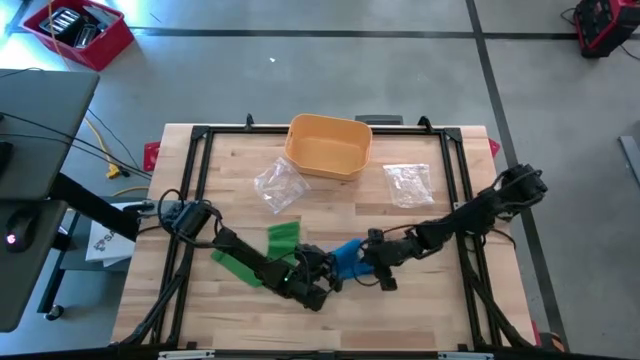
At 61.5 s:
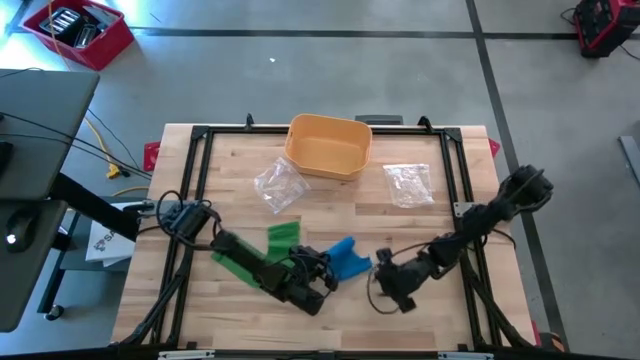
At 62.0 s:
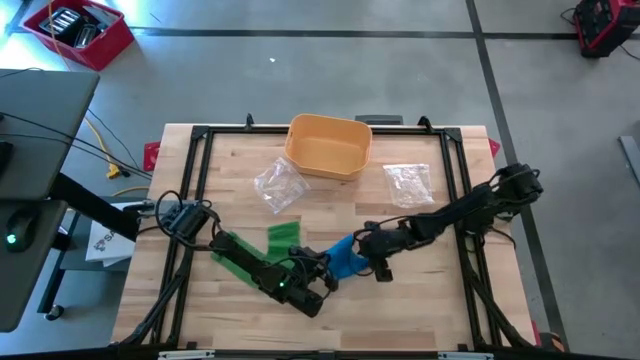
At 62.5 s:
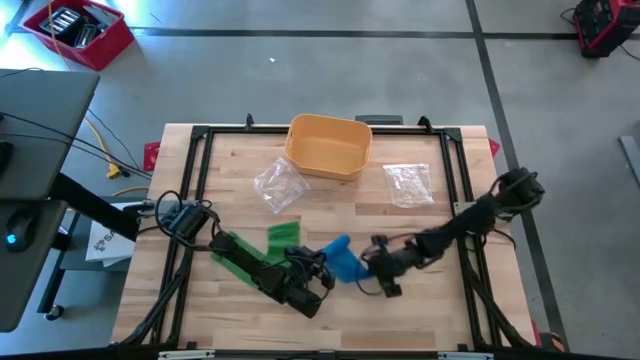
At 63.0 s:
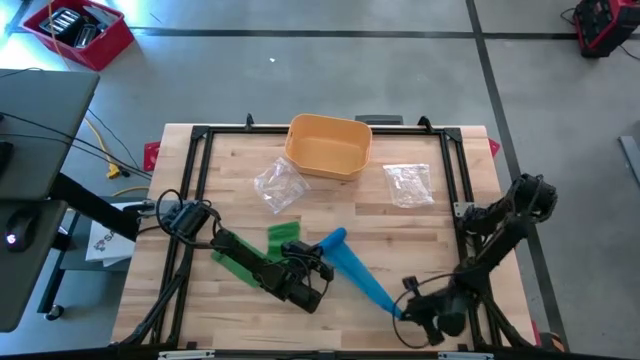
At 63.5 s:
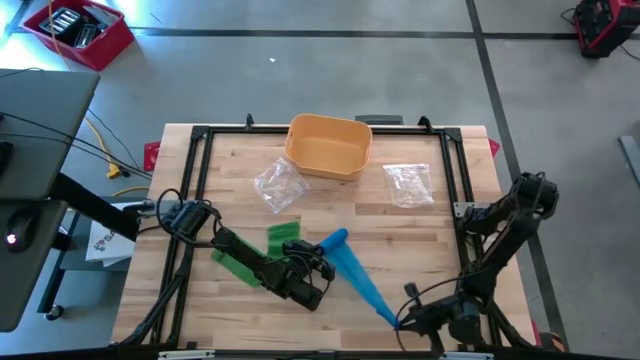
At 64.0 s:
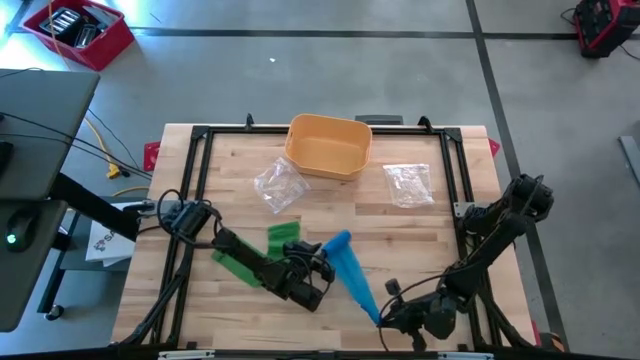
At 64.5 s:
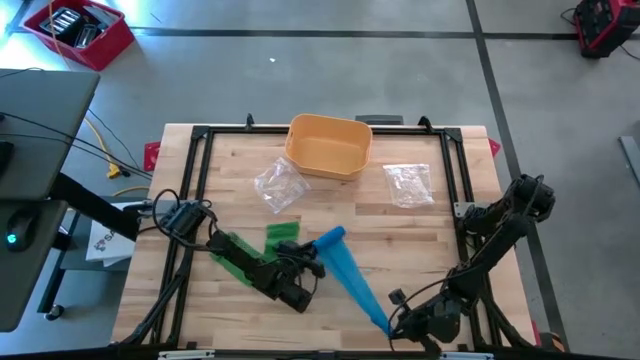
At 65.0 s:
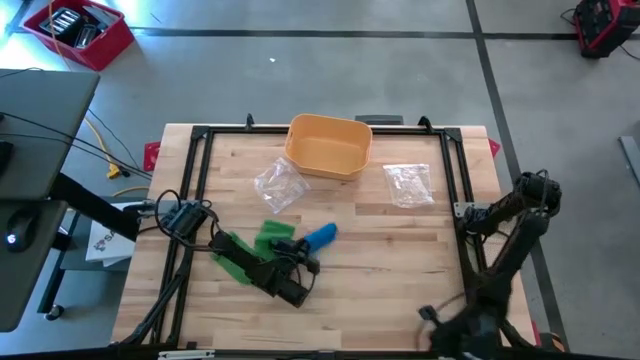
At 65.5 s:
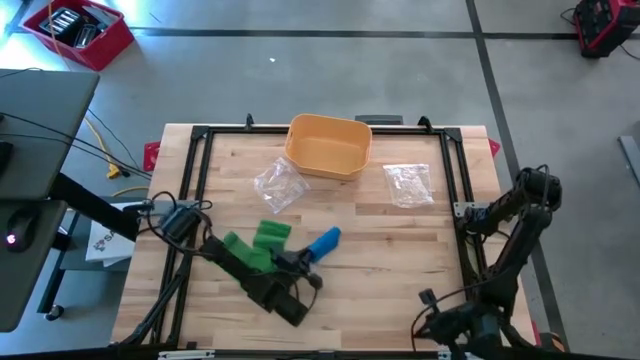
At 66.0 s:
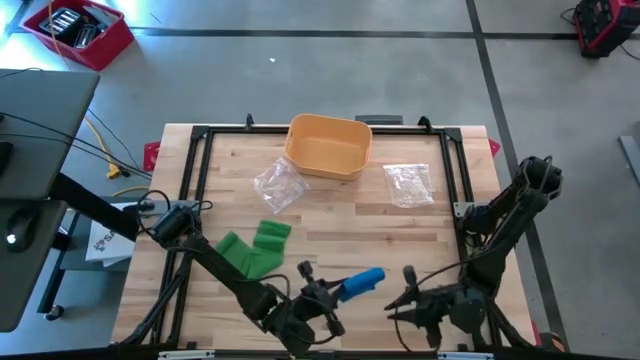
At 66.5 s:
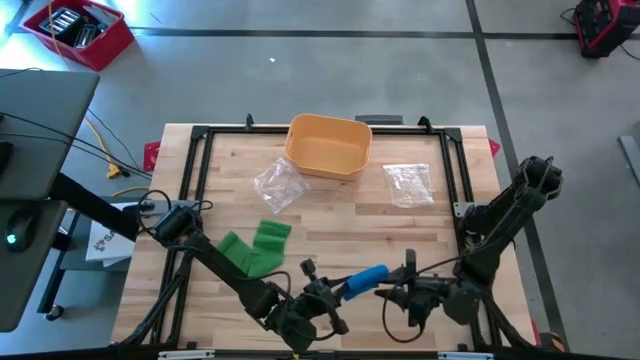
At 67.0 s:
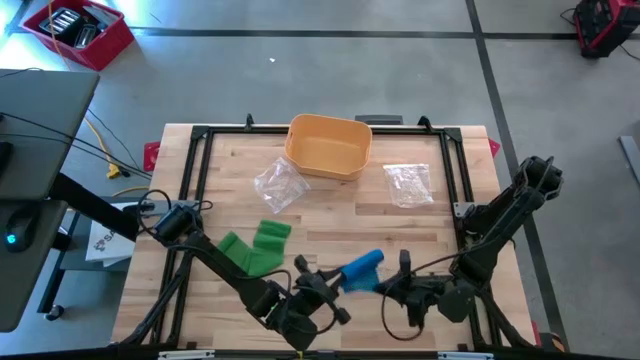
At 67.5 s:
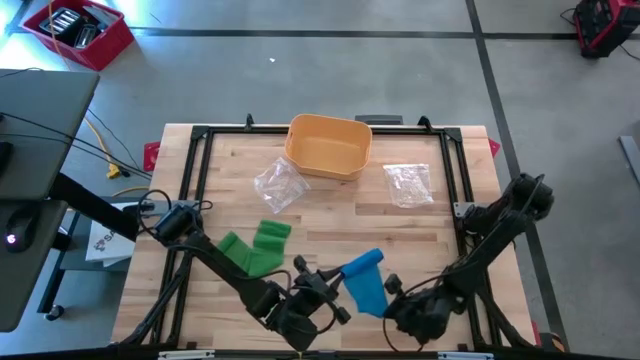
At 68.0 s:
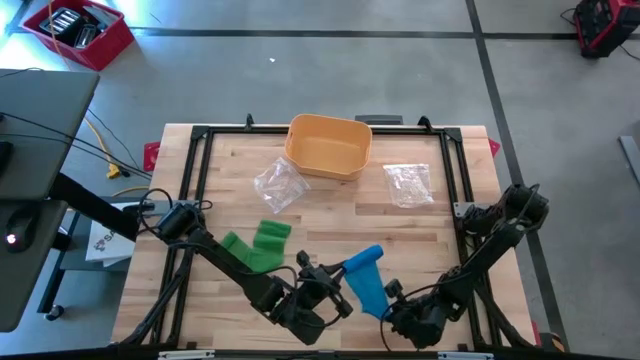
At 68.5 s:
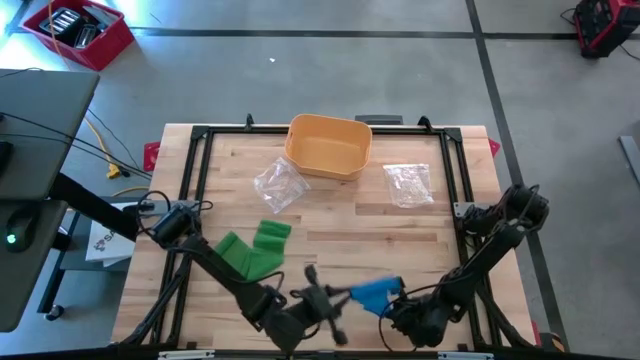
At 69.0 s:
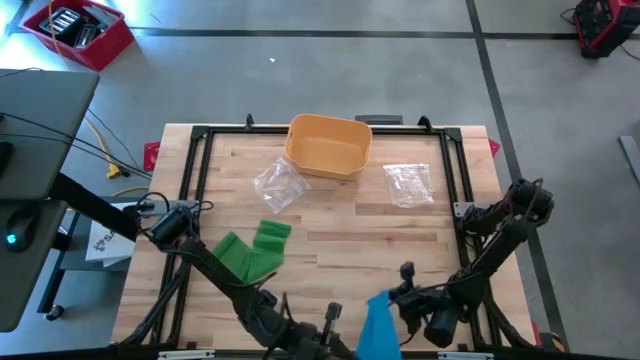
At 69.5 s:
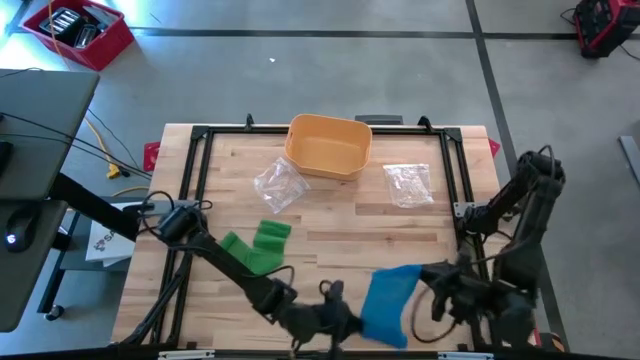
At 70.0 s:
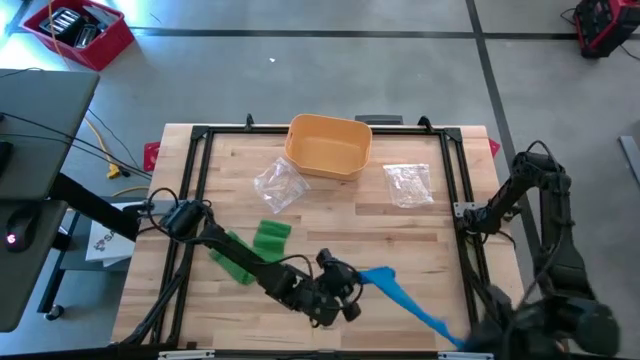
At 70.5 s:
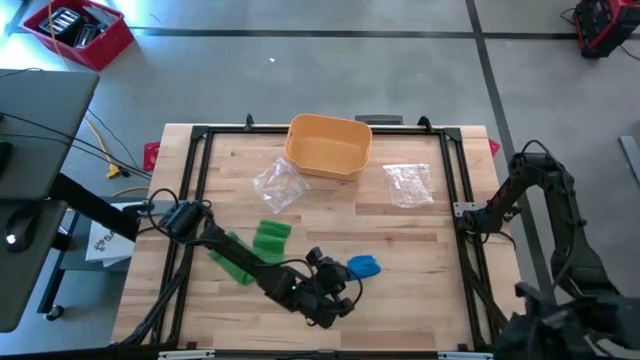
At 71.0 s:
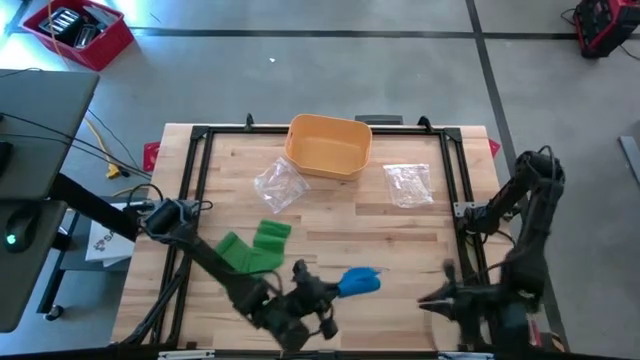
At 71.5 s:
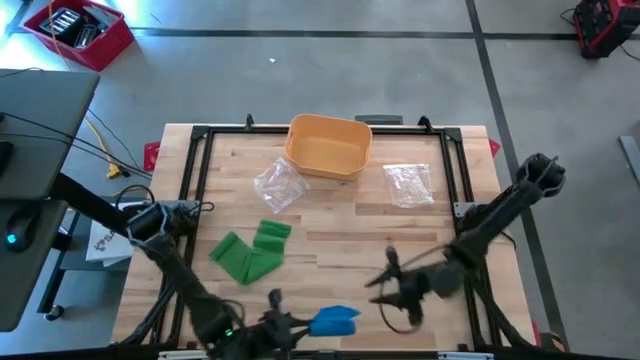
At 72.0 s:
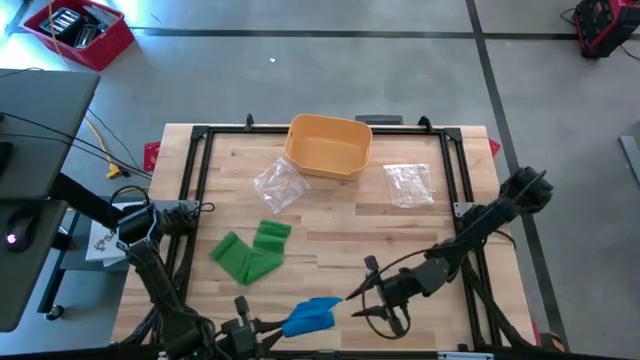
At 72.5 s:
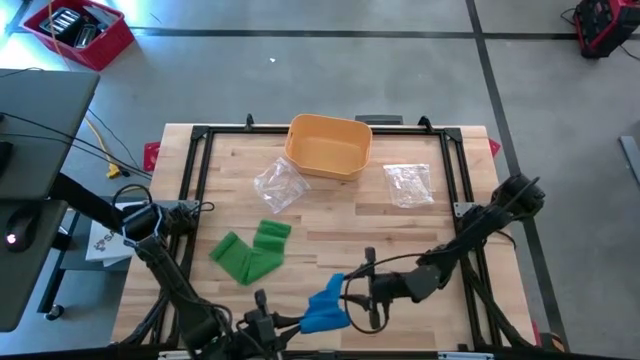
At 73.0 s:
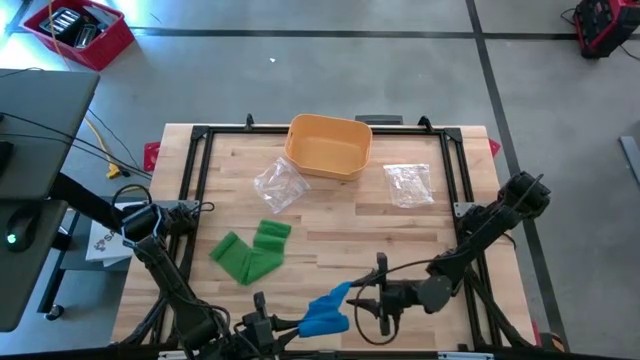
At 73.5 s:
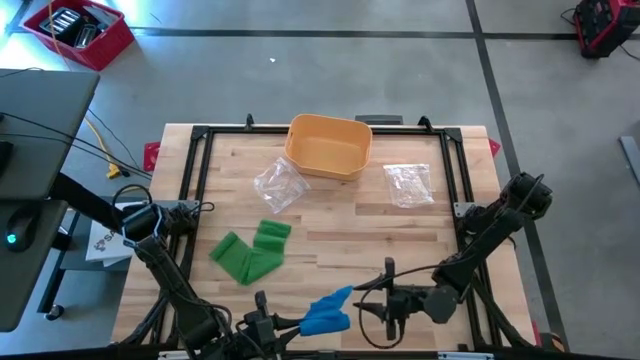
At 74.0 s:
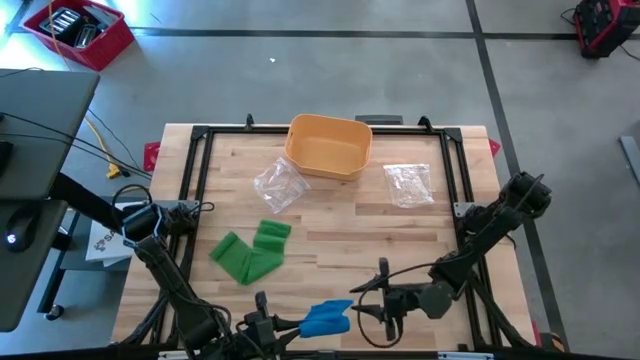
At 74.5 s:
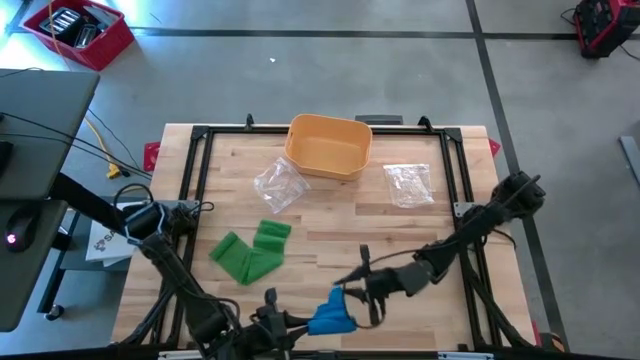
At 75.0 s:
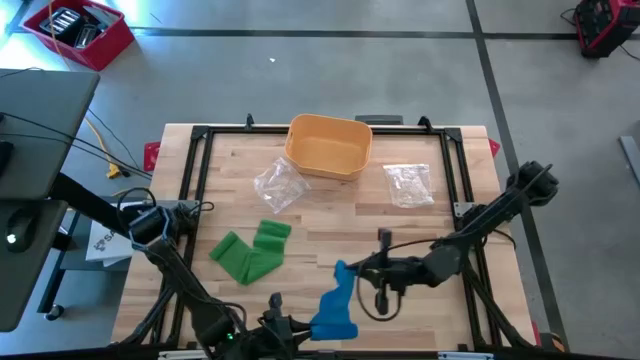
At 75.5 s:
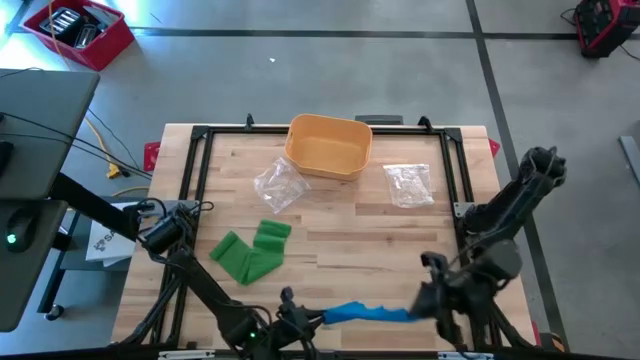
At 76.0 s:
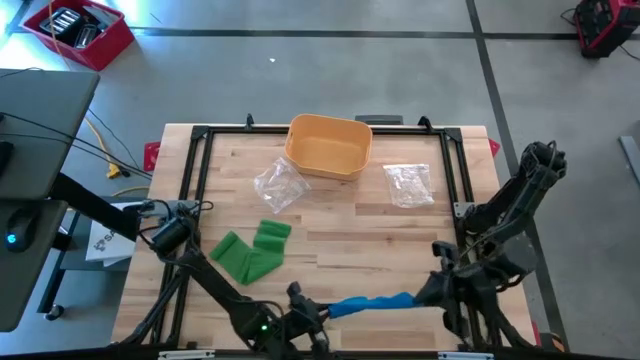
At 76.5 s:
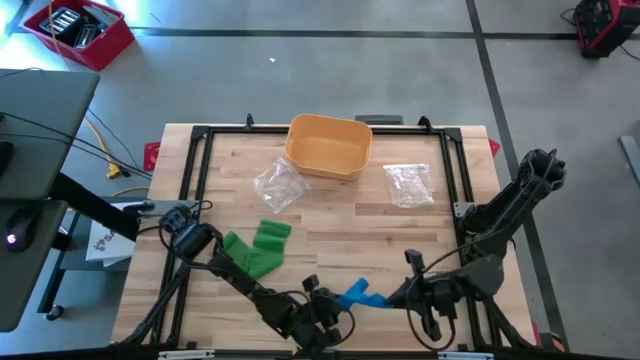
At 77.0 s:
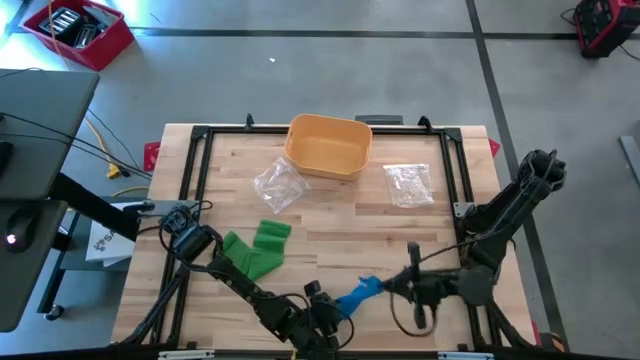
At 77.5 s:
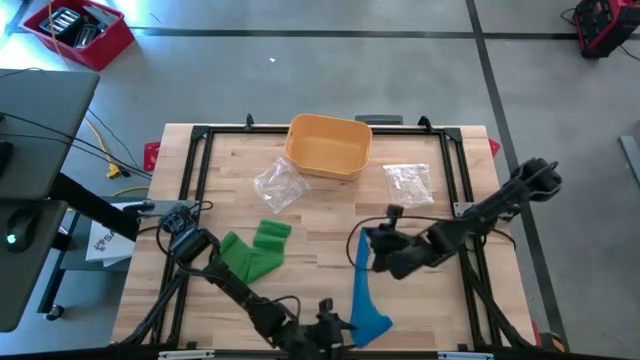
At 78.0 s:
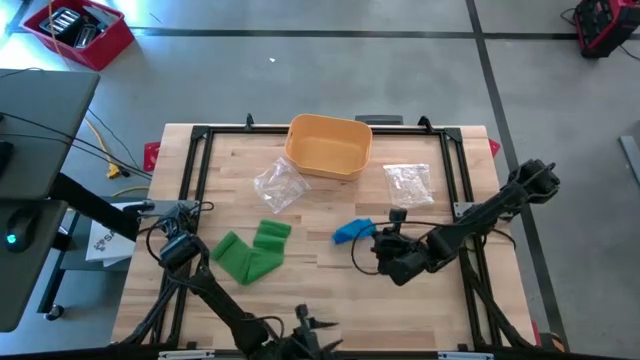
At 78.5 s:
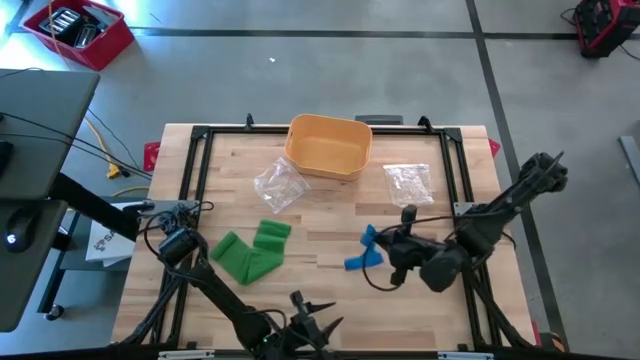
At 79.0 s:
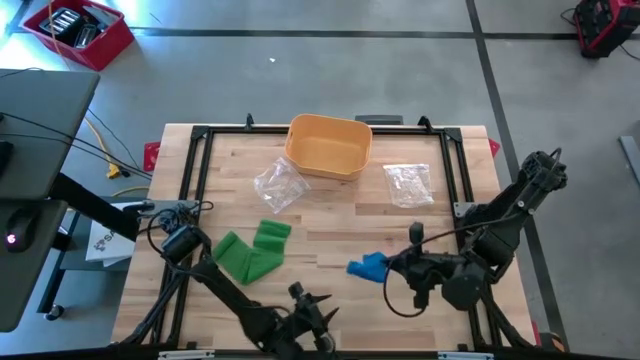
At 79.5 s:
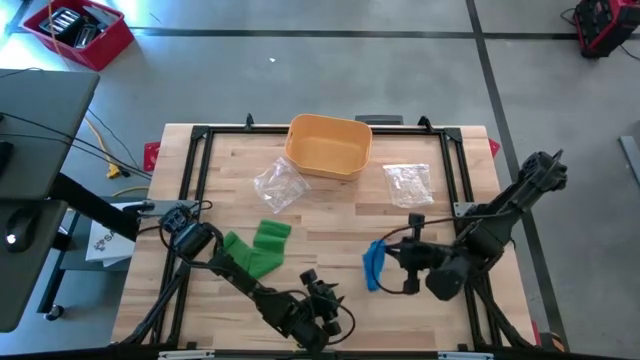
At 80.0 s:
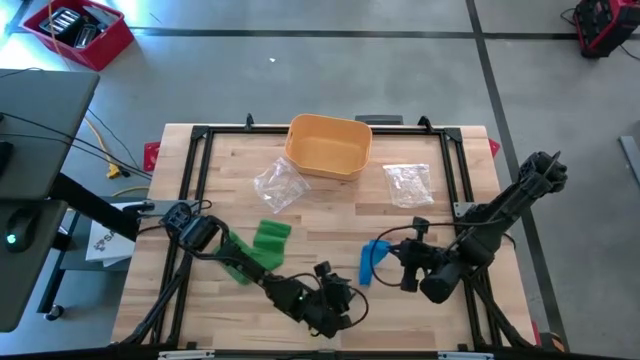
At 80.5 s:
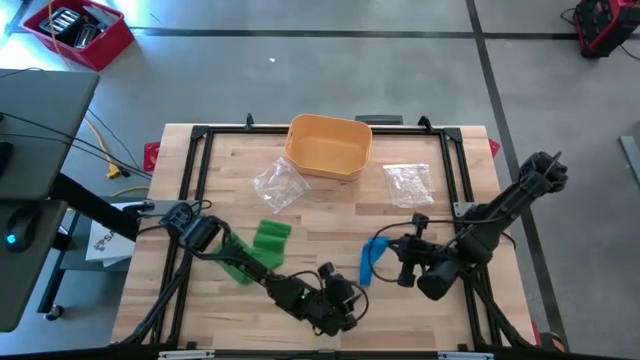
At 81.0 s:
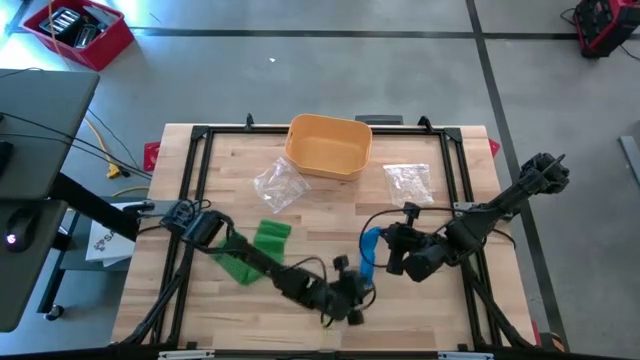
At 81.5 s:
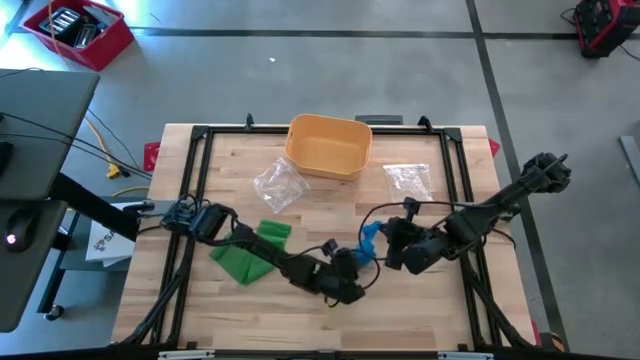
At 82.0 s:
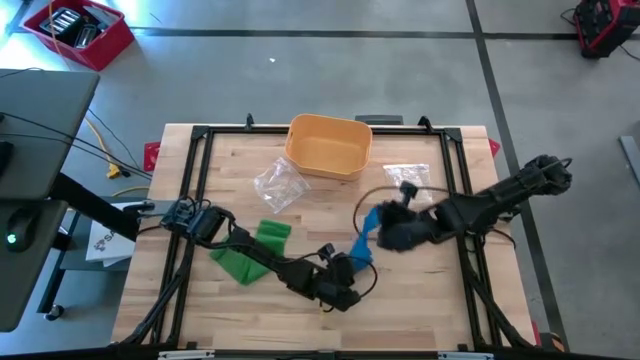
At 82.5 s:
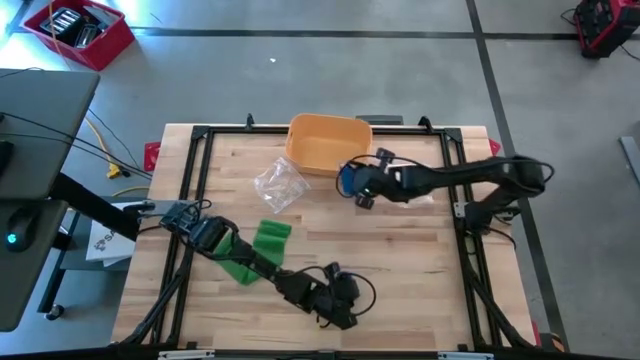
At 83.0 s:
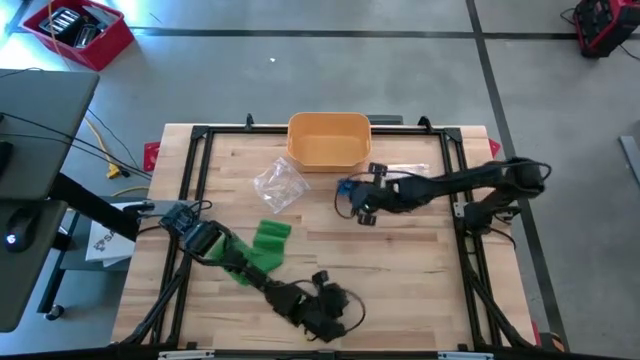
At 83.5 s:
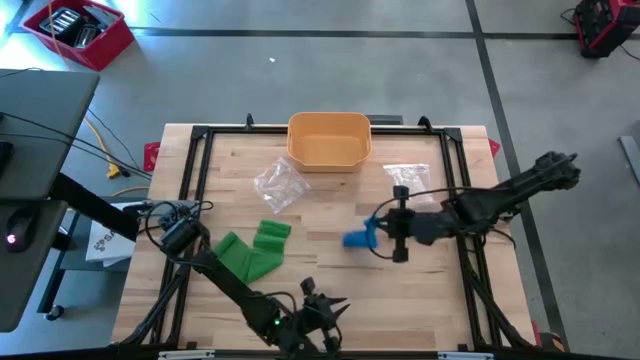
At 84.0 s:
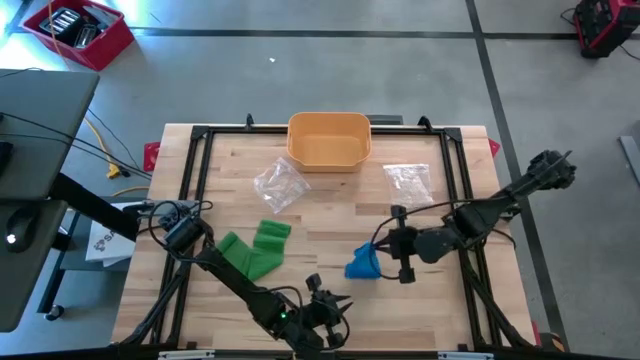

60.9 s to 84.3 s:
Task: Roll bandage
Roll the blue bandage
